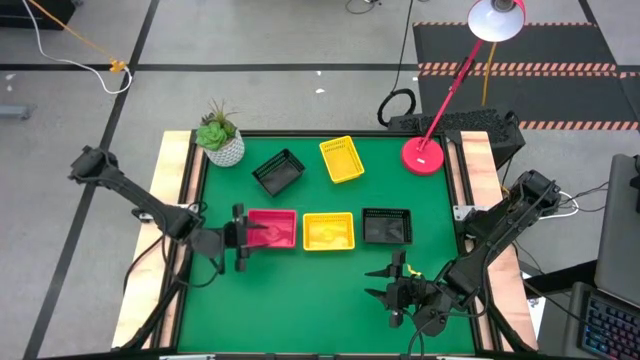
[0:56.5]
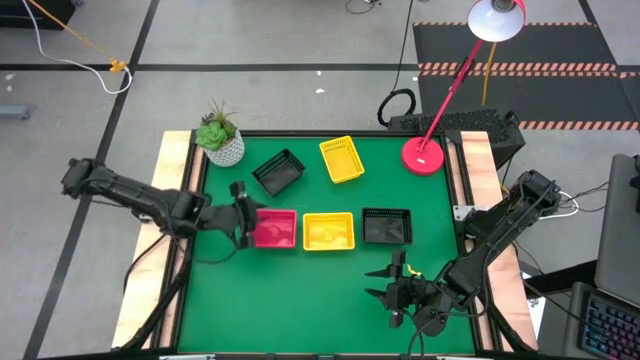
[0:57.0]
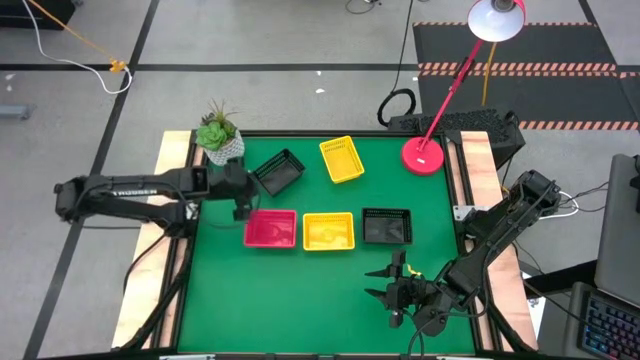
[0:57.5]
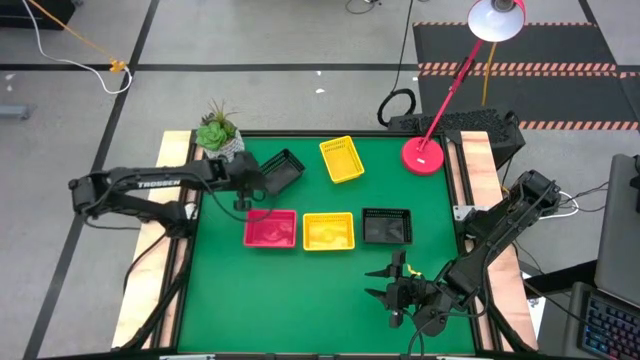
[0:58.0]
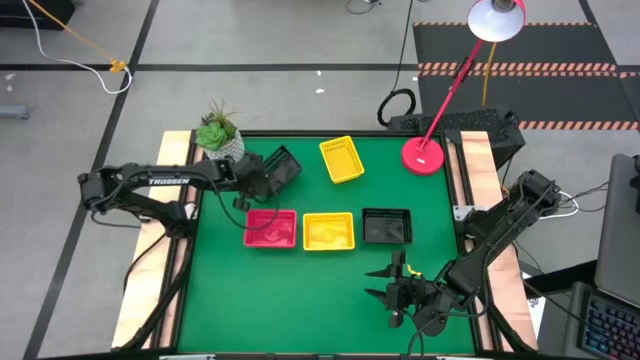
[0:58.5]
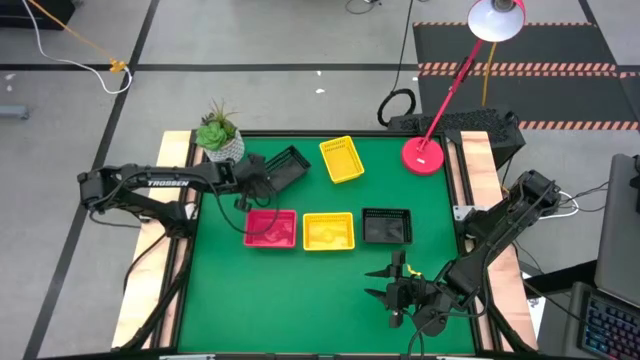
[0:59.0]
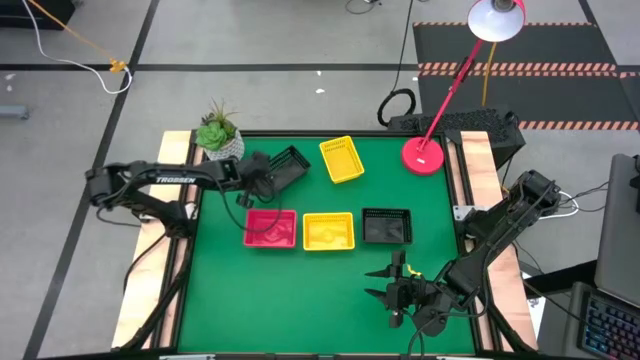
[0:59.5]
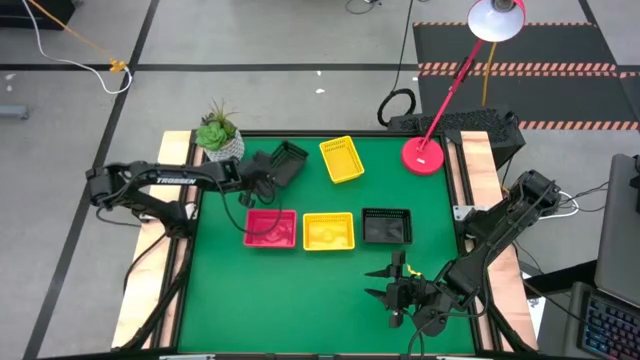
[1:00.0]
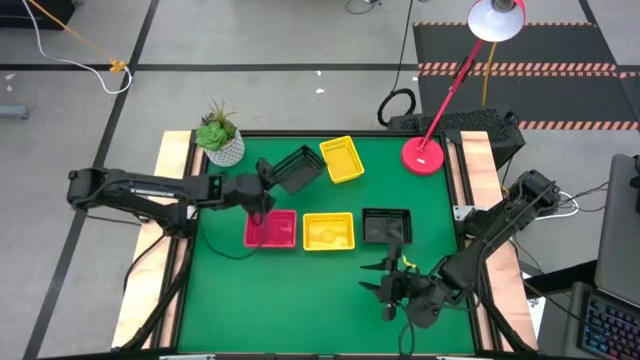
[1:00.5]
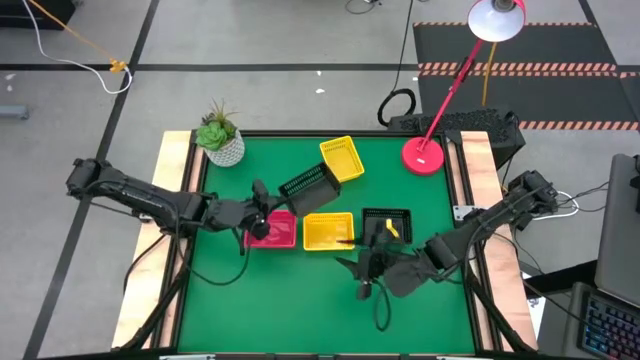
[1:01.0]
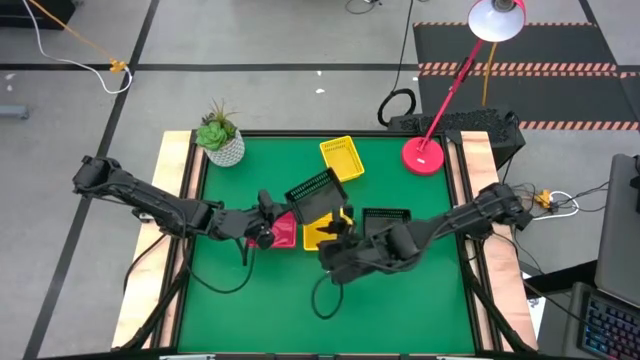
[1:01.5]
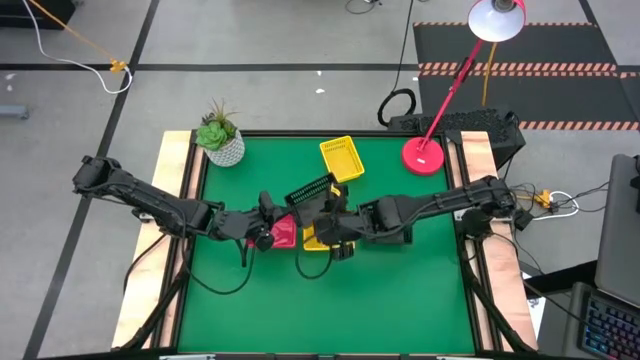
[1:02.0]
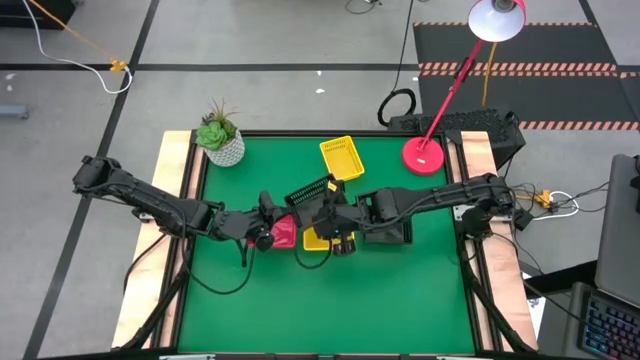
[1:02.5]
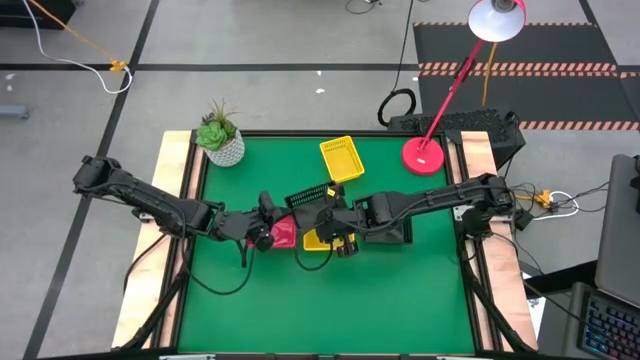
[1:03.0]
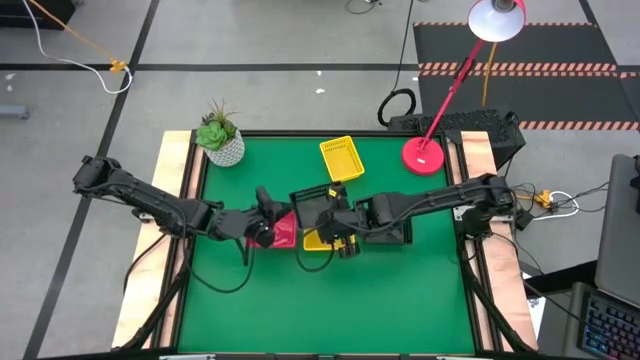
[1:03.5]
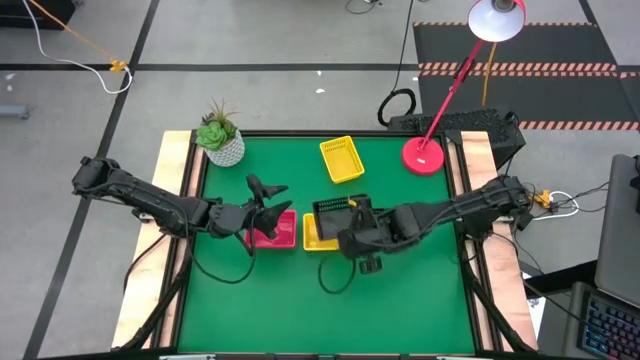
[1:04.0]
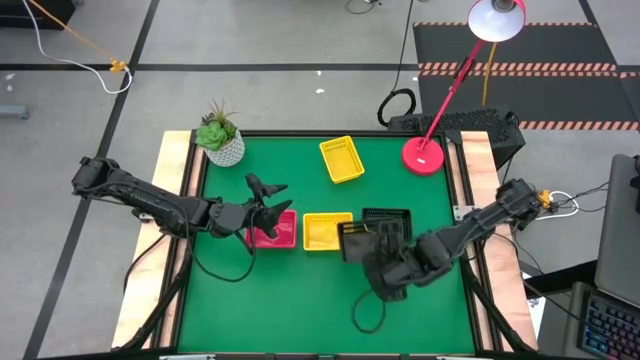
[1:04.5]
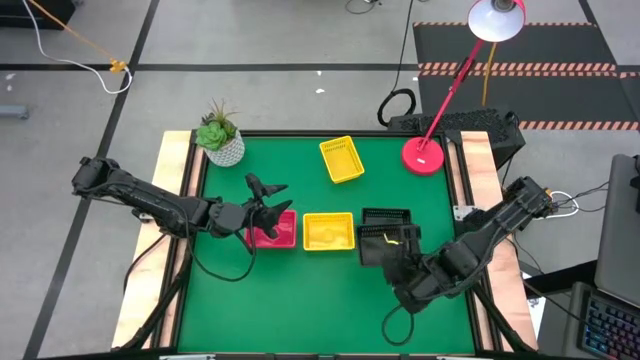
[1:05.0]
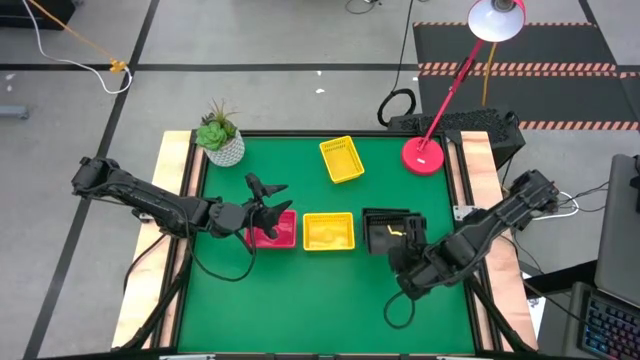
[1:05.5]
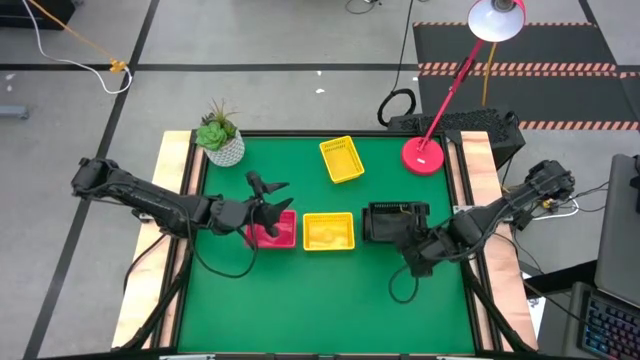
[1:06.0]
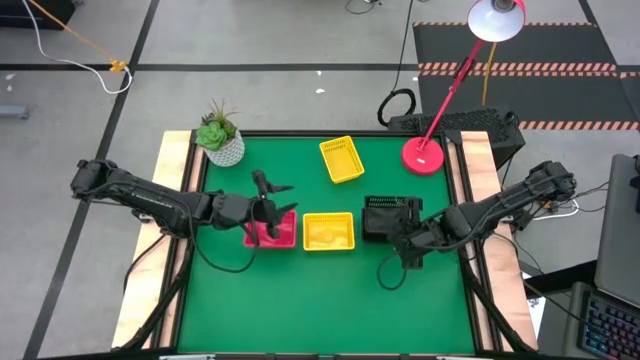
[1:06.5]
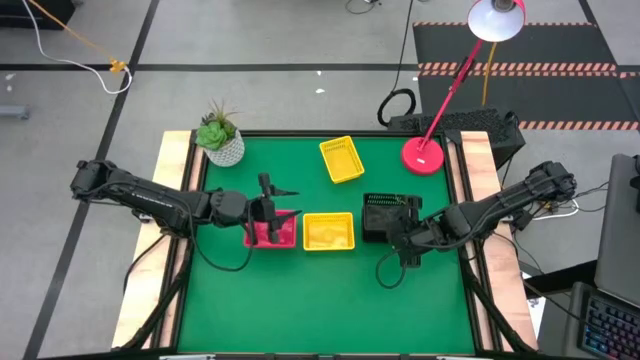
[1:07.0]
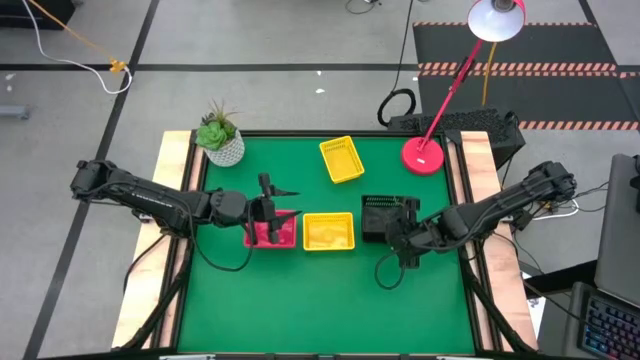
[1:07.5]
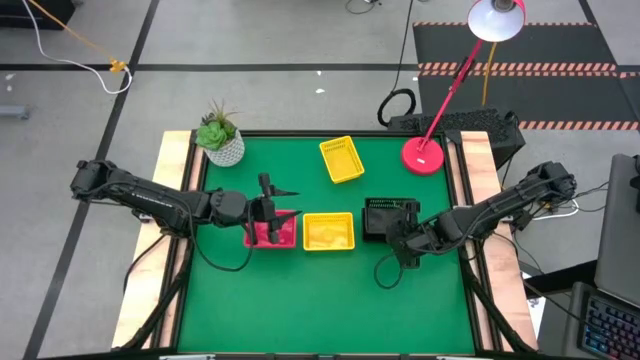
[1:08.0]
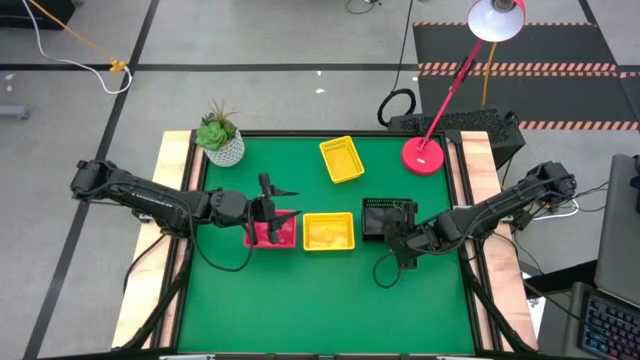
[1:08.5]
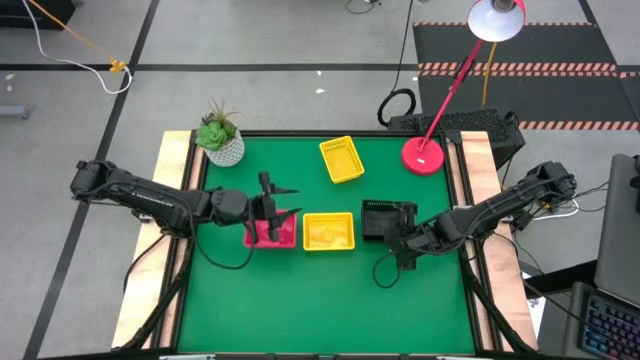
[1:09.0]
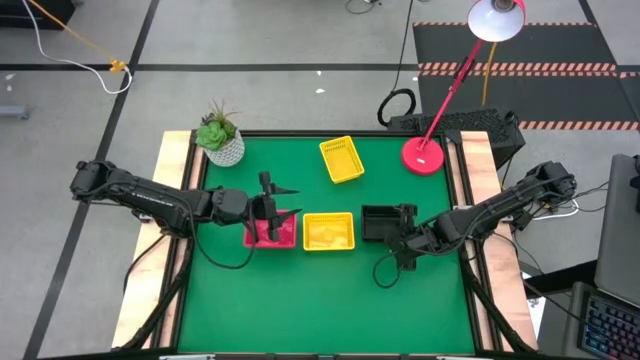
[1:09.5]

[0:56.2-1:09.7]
Stack the black bin on top of the black bin

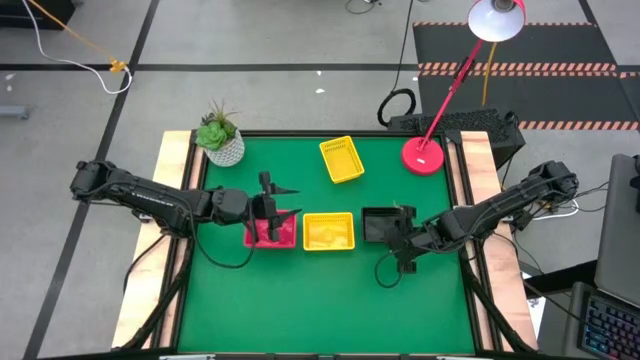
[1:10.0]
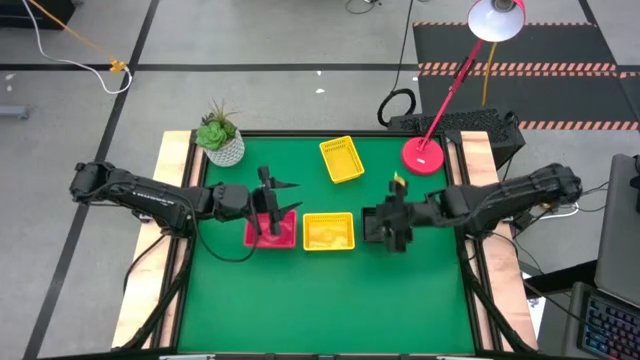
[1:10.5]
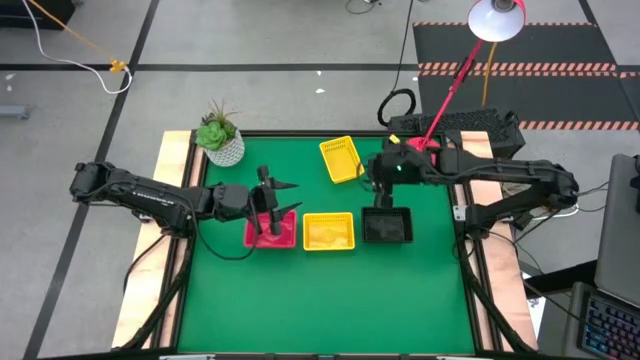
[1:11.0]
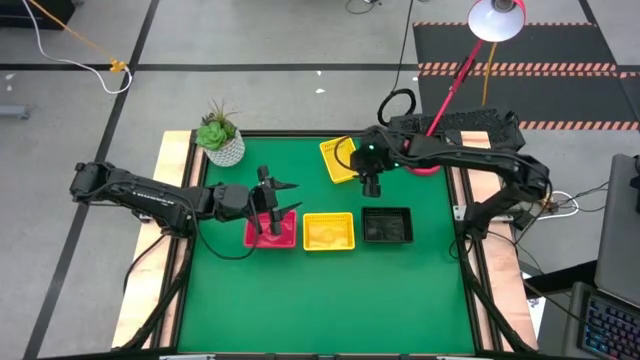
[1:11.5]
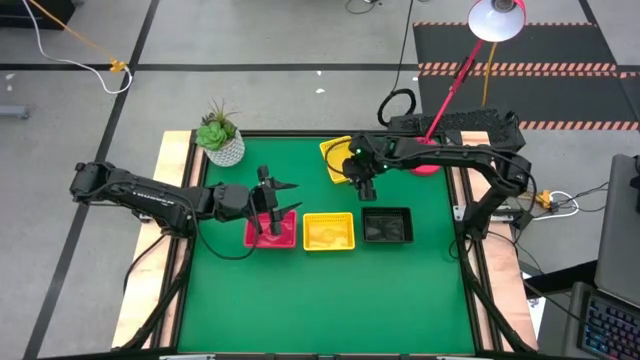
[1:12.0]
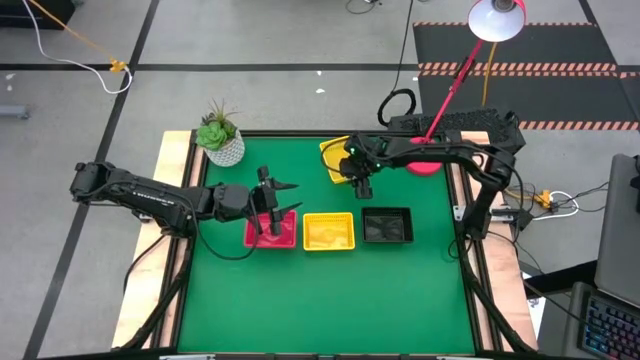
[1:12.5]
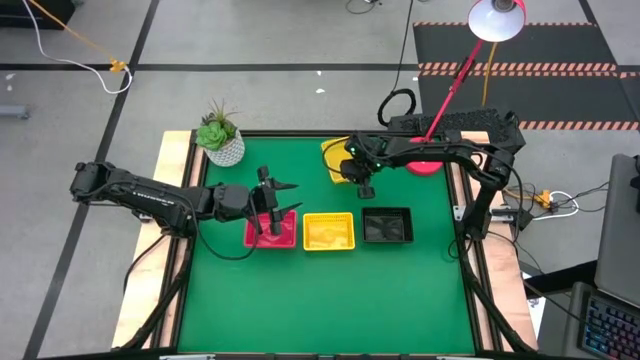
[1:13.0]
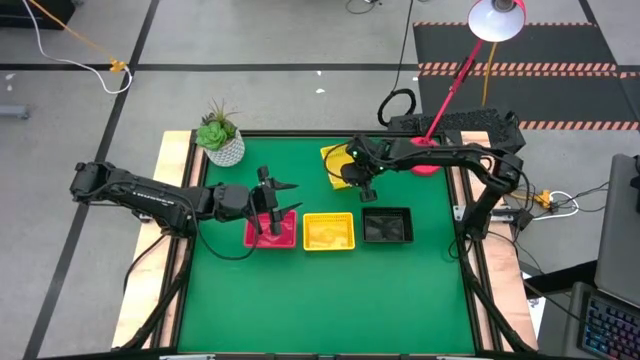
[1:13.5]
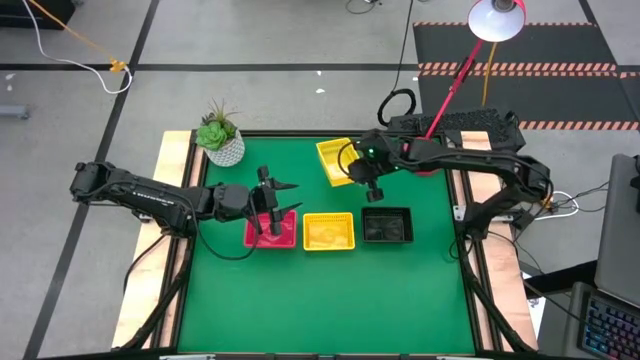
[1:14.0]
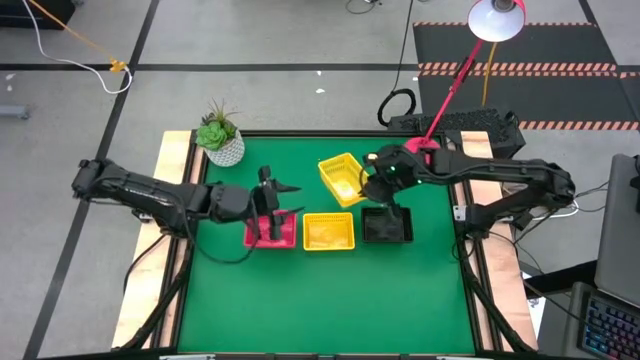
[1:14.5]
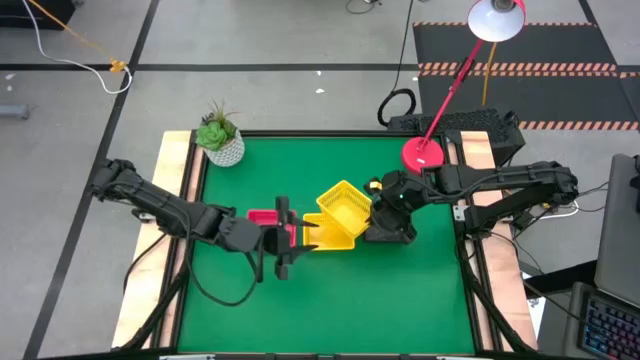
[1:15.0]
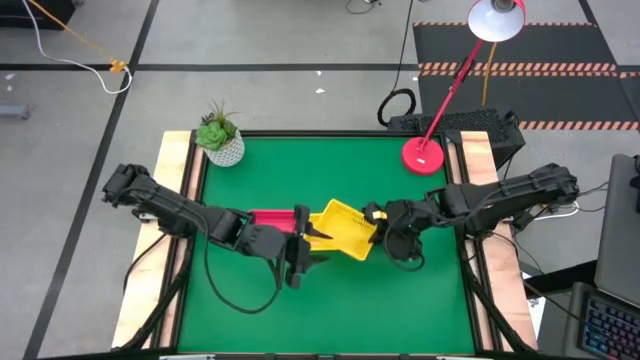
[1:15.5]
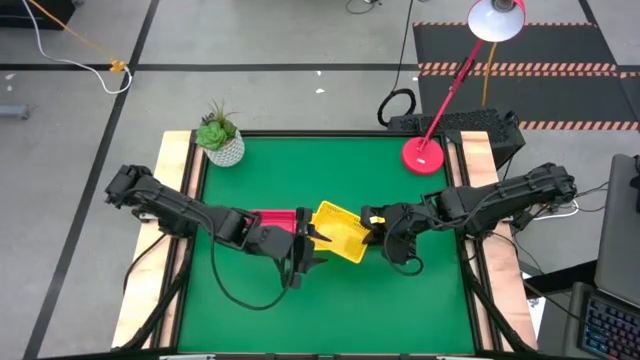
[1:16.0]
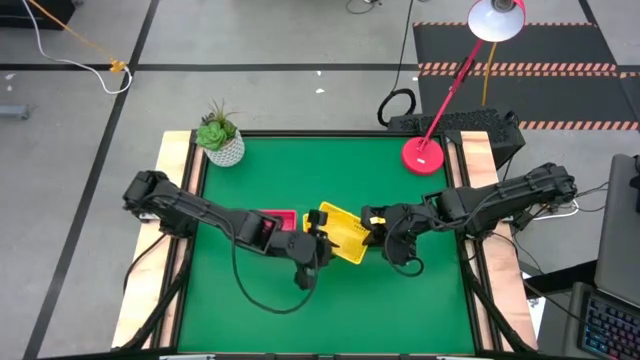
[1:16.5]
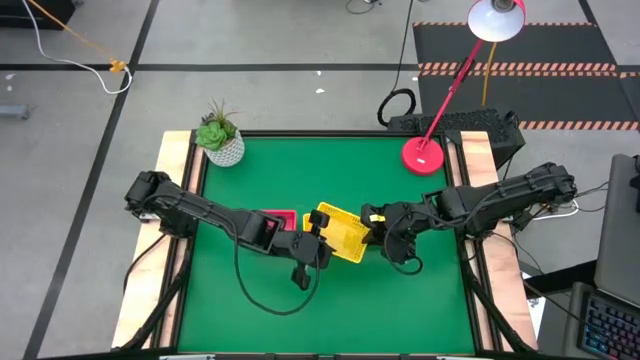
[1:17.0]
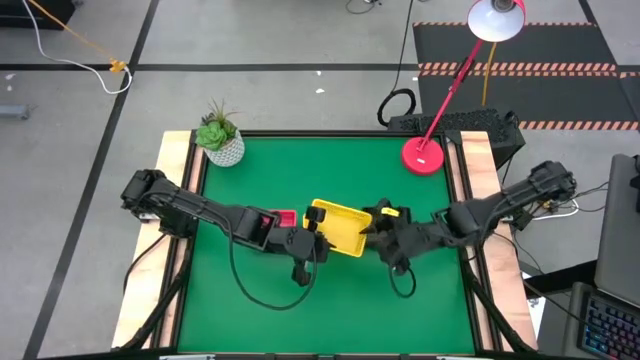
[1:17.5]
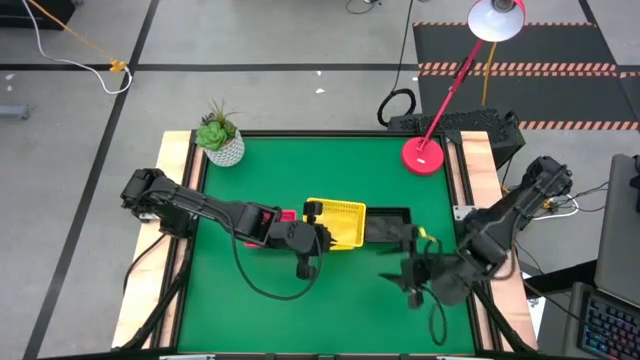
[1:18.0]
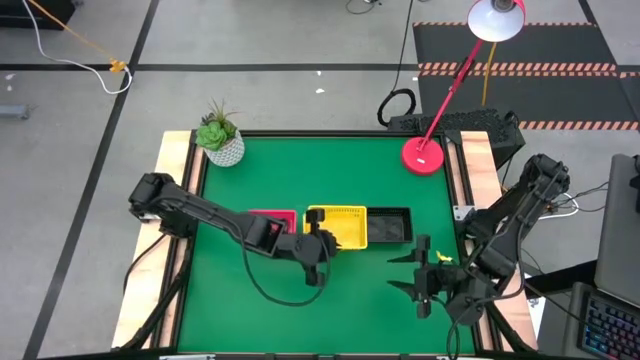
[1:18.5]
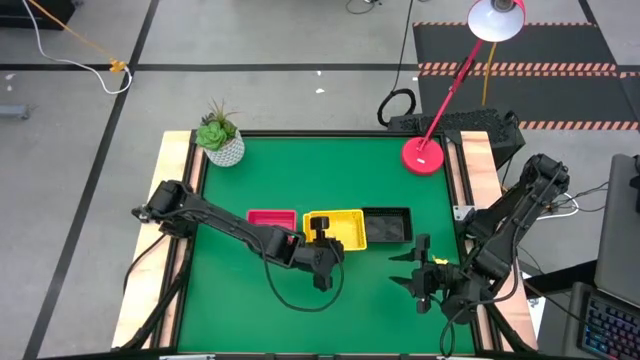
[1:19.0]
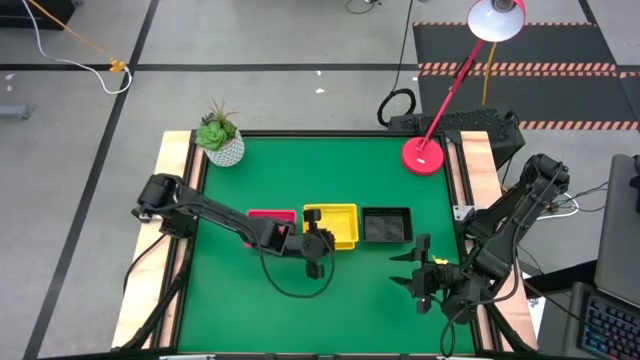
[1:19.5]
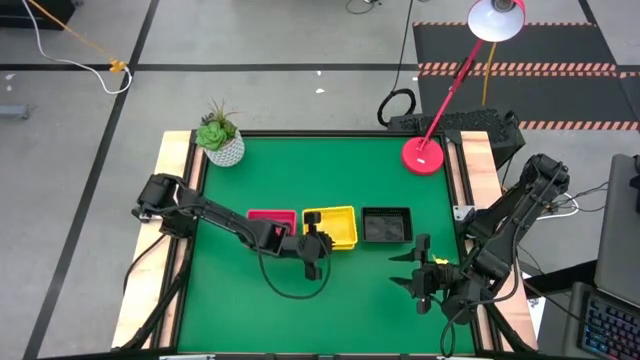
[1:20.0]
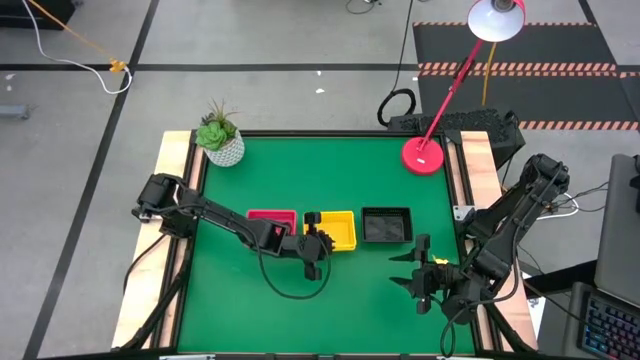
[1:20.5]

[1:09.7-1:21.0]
Stack the top right yellow bin on top of the yellow bin
